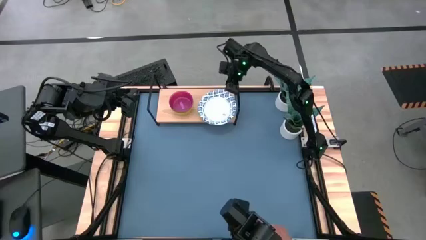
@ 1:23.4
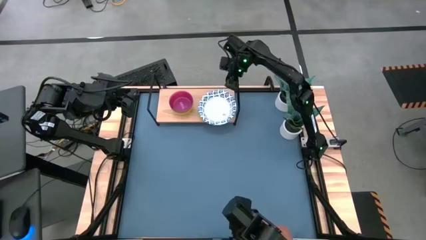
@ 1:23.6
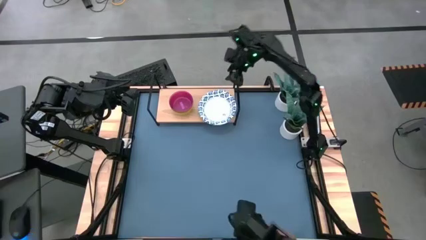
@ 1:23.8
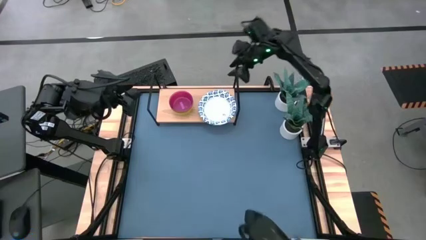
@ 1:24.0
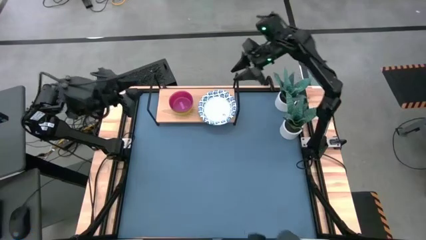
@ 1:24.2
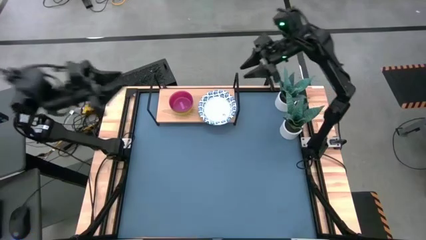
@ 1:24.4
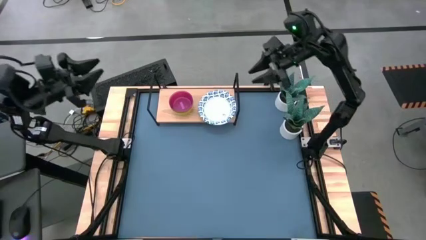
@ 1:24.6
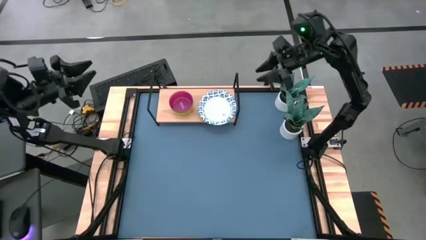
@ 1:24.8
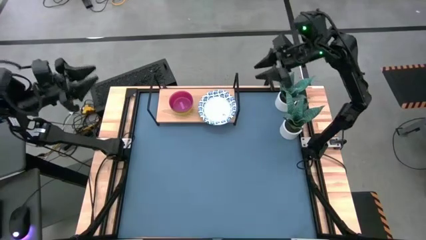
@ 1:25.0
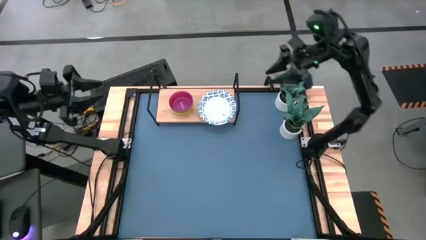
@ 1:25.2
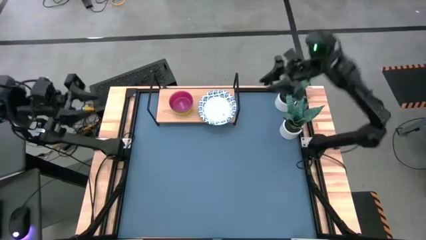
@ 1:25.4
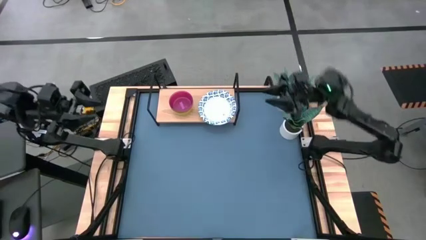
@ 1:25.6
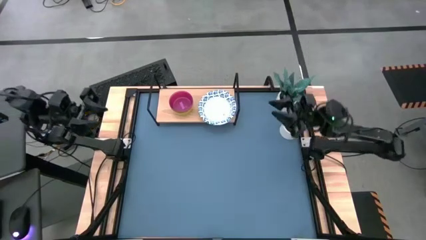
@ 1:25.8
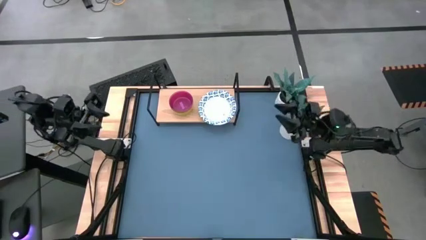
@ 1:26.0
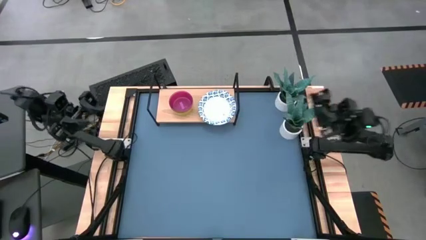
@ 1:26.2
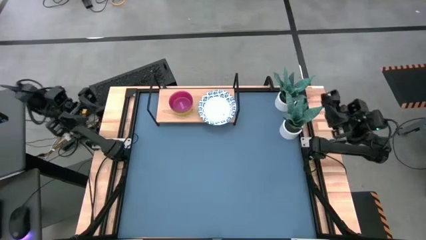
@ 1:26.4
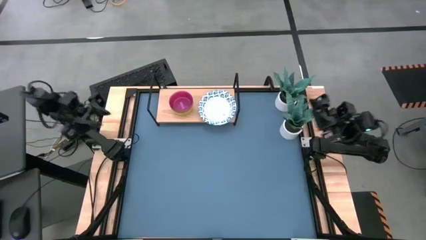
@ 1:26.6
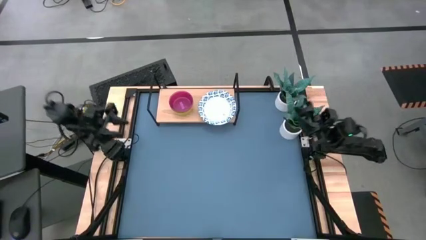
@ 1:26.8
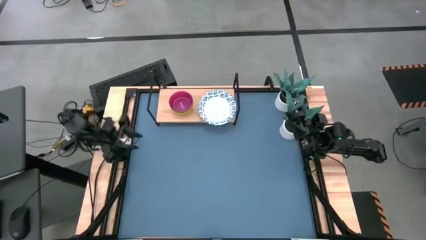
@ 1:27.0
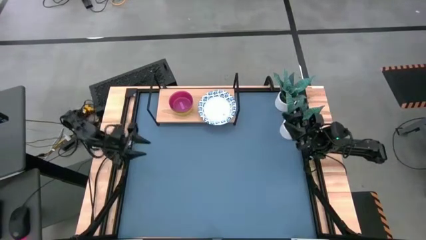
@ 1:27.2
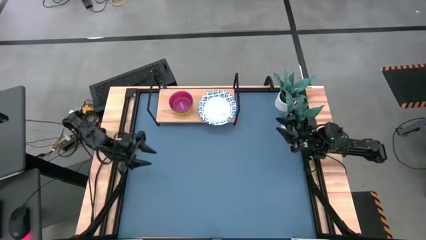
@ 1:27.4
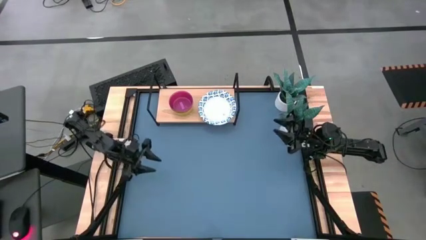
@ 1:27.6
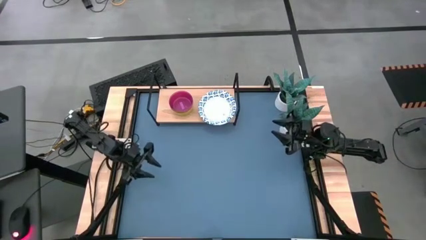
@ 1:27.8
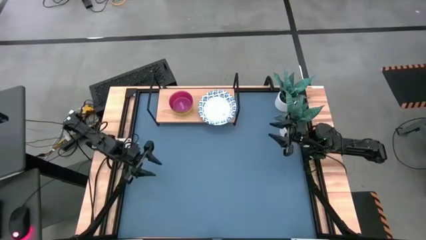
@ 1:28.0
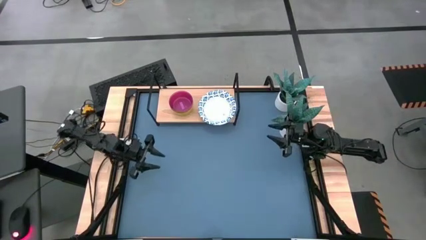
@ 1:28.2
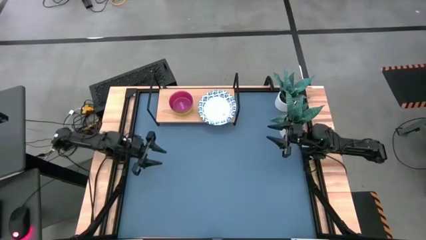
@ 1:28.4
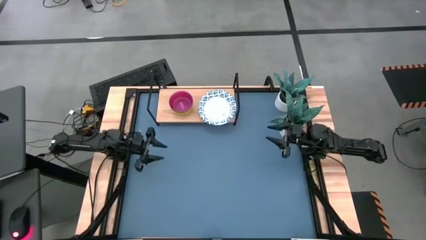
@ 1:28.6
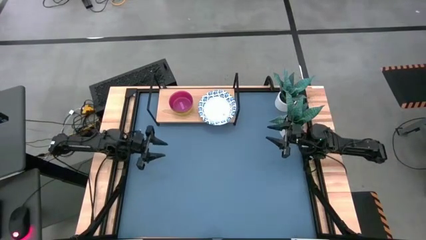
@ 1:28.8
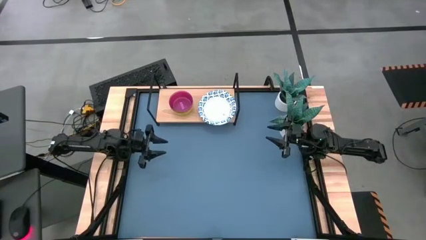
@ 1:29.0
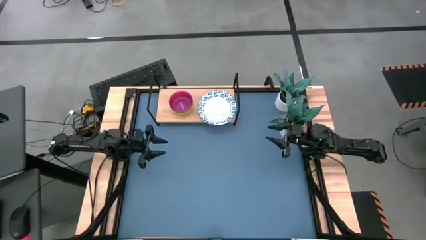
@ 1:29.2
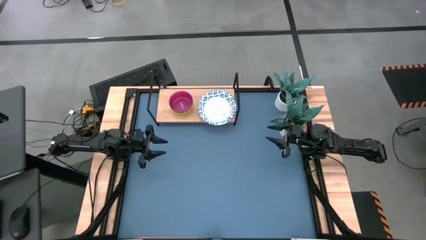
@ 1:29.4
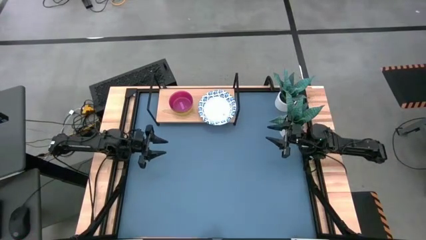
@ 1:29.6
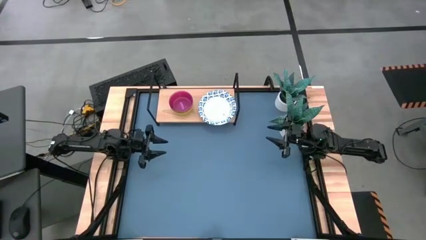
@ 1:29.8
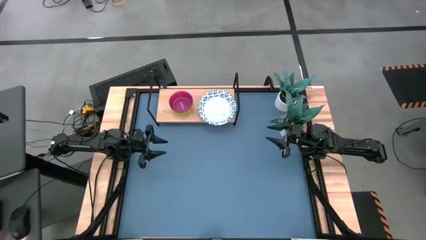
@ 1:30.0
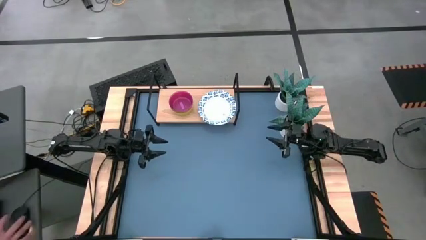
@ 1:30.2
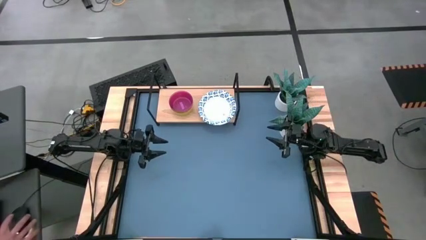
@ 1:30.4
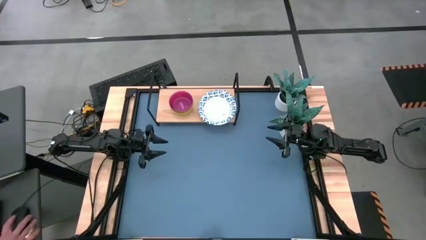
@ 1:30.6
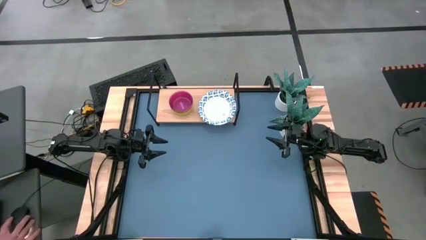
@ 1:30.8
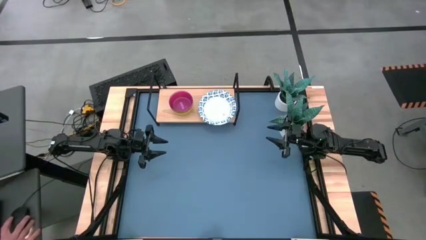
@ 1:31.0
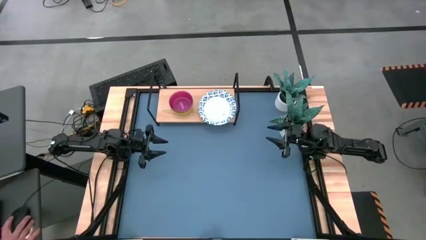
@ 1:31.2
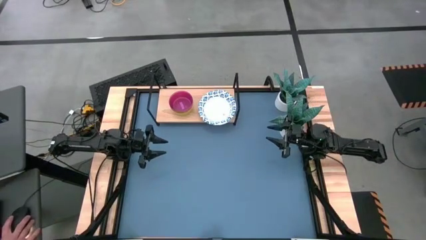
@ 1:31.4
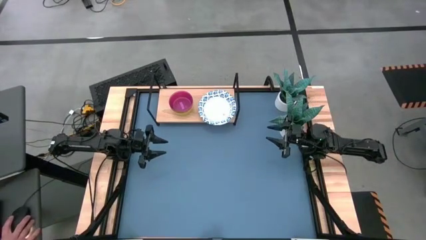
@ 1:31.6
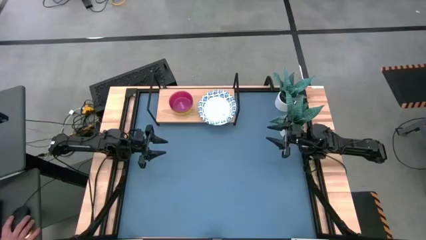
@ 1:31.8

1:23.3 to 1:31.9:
Task: Place and stack bowls onto a shelf
Return to Home Position

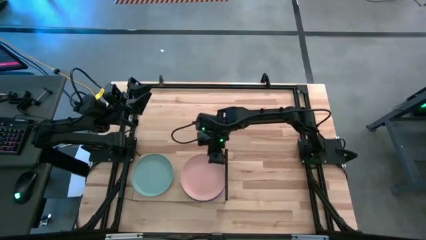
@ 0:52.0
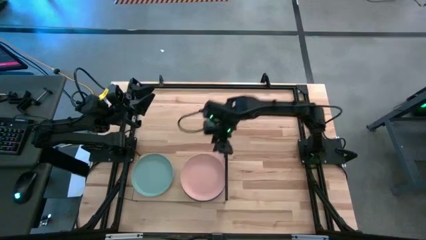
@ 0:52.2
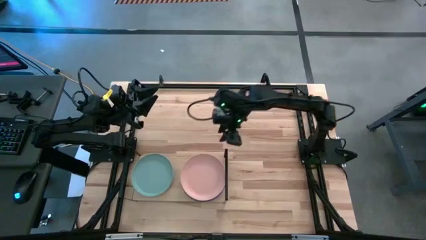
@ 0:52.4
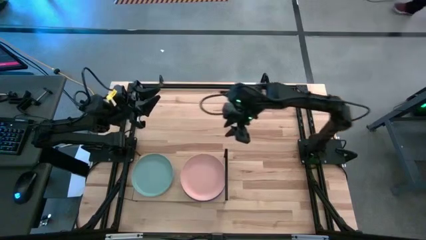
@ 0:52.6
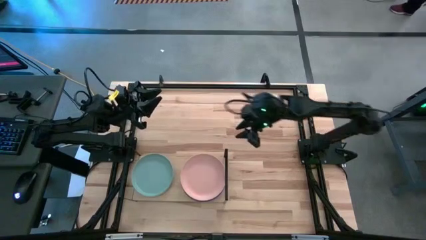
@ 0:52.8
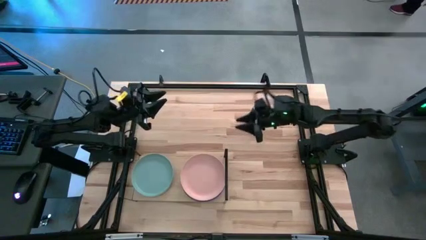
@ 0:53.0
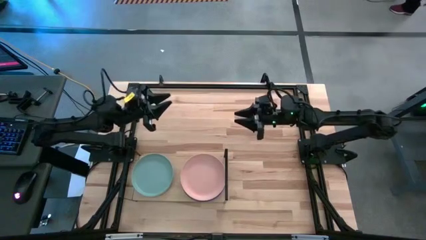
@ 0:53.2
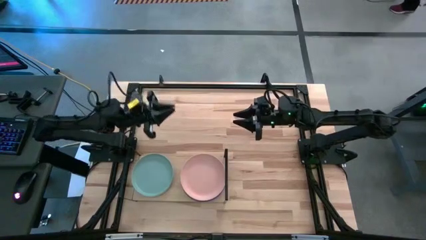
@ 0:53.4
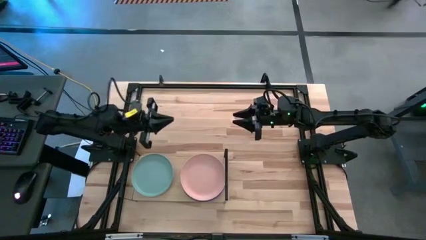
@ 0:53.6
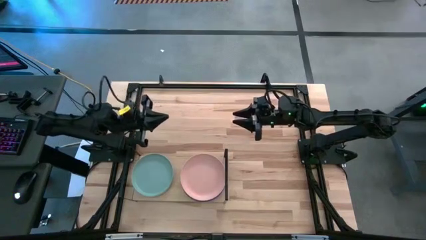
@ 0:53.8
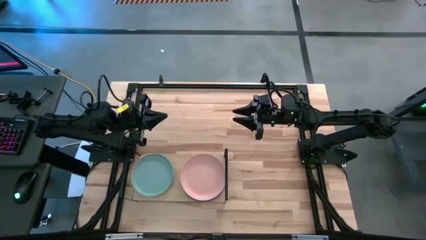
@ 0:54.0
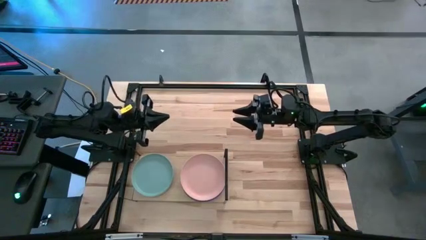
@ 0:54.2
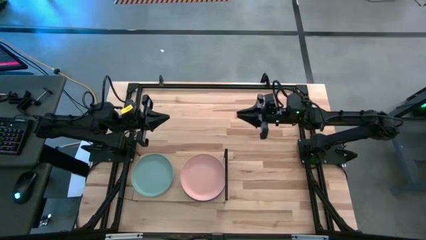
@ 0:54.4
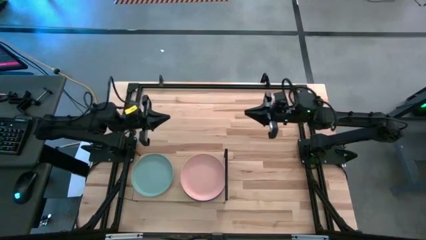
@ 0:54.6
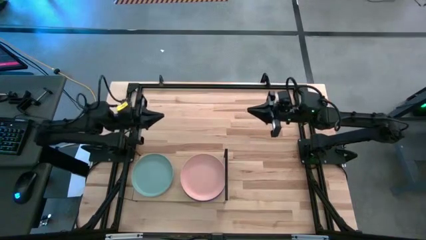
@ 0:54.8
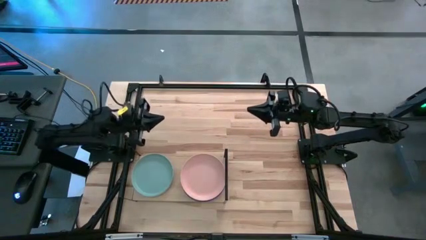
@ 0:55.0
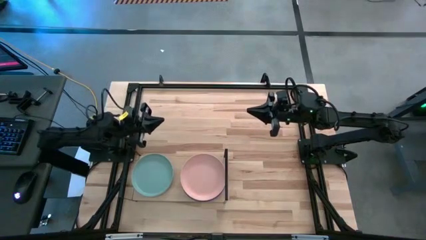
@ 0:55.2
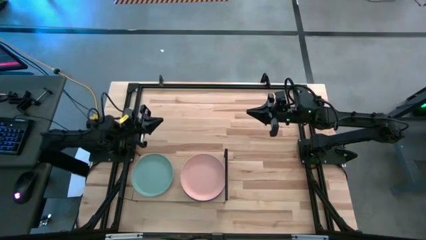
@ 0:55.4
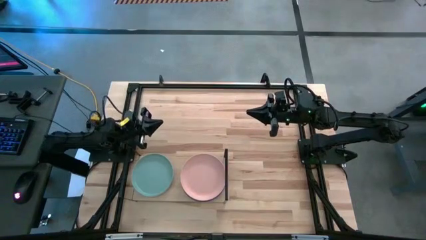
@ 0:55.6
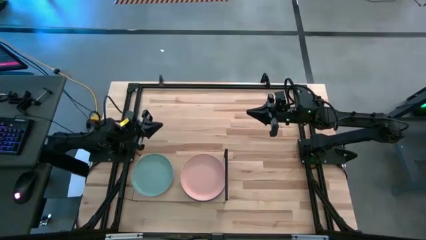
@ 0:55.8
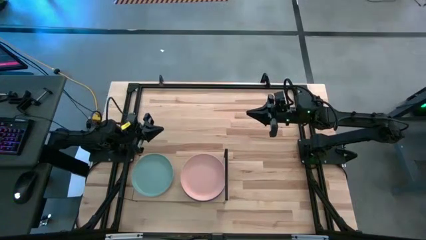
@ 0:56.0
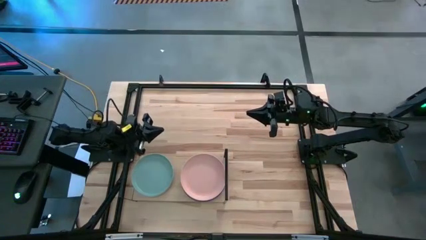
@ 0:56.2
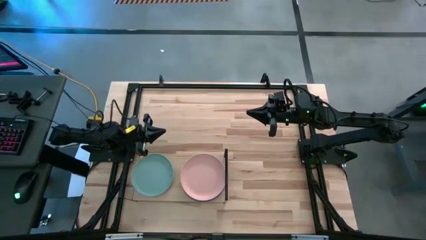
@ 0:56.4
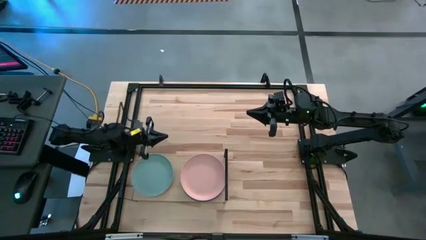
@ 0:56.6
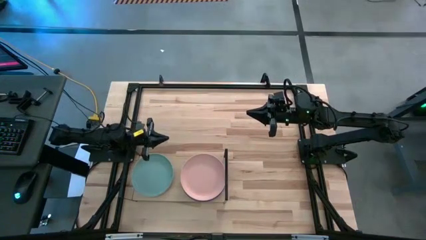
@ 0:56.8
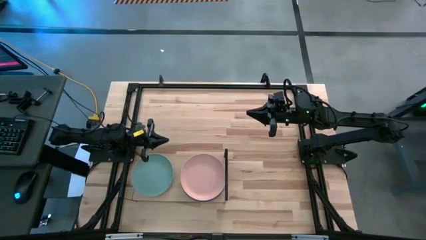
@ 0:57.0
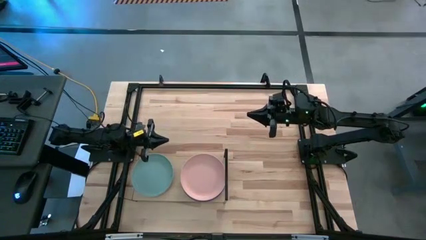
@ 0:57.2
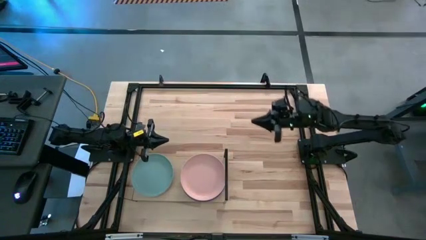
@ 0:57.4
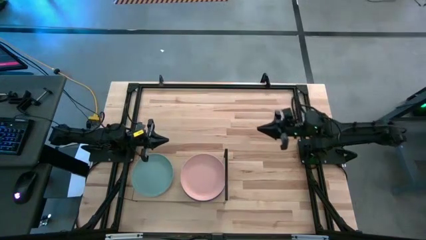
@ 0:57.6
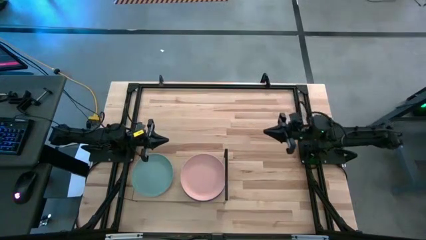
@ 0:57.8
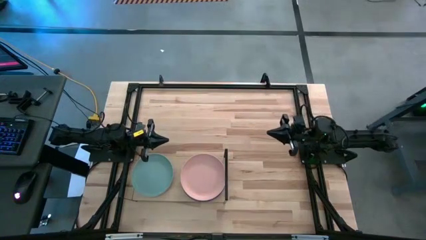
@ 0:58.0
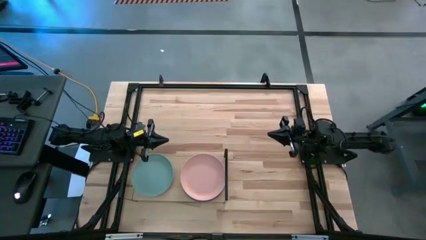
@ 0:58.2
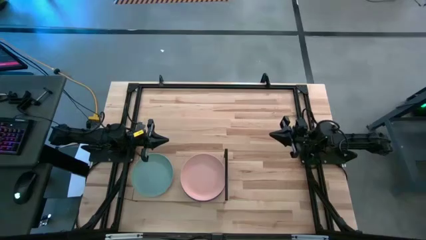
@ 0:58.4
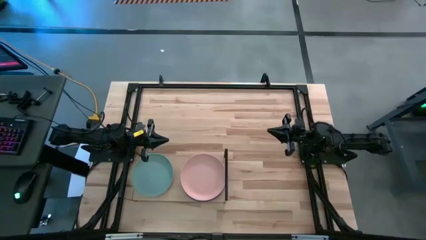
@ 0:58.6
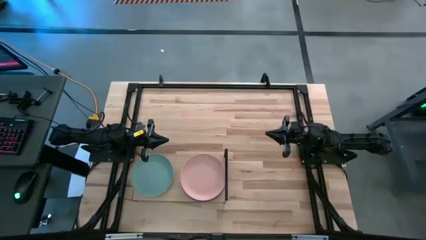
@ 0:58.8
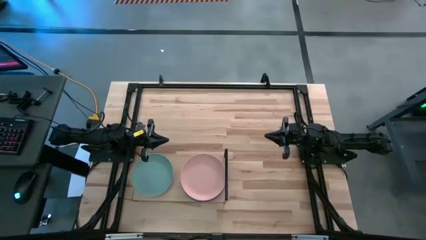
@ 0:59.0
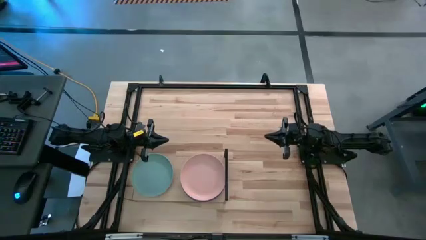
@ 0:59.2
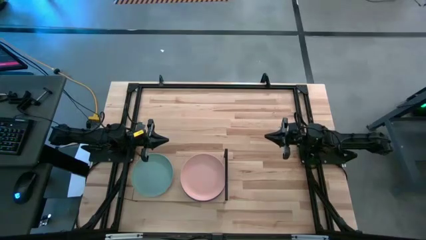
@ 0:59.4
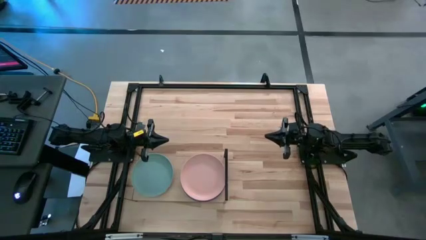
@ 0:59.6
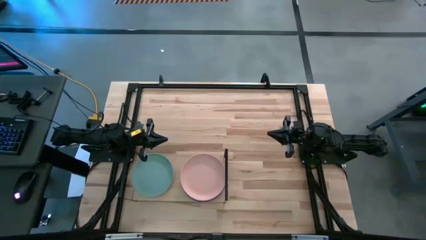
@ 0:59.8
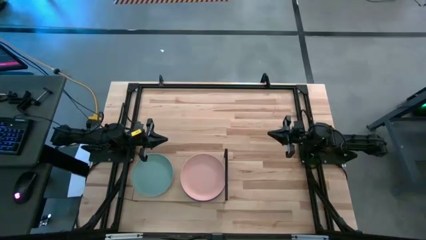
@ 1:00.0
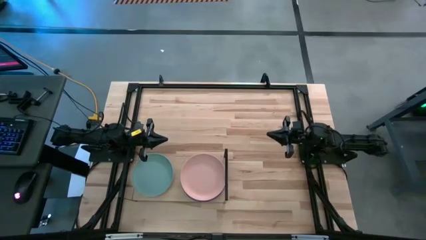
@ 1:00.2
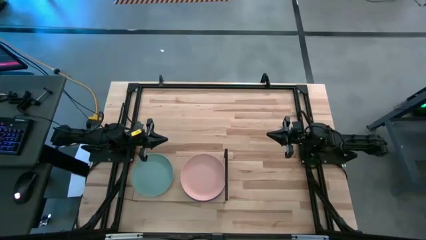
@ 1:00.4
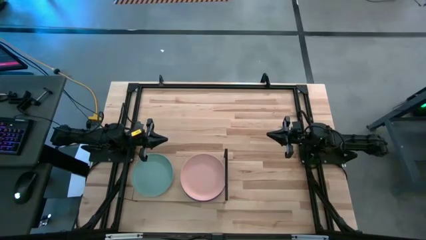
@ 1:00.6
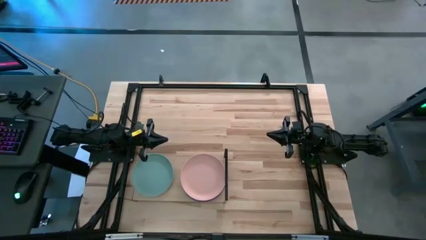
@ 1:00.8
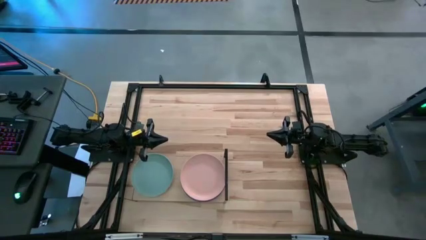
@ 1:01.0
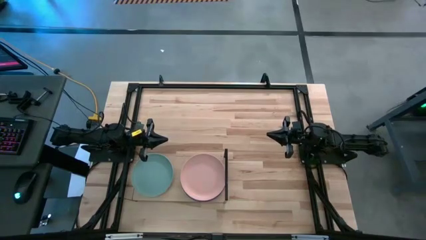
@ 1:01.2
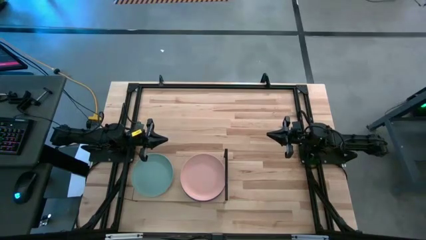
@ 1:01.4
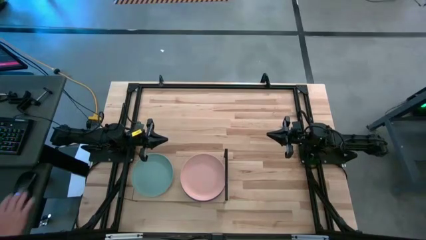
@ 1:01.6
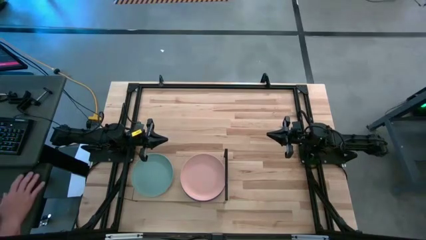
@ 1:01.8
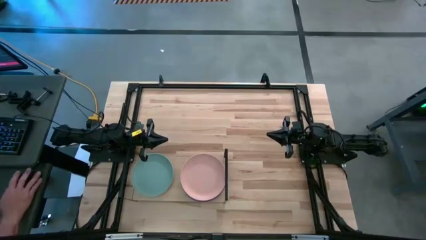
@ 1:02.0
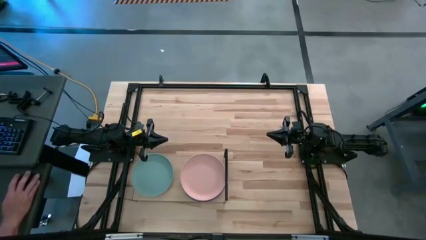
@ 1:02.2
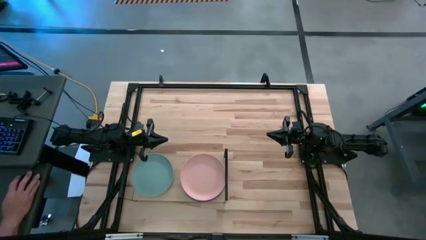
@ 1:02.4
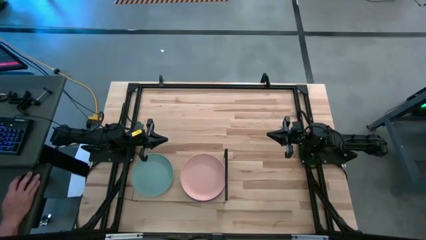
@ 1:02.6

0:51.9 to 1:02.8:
Task: Place and stack plates onto a shelf
Return to Home Position
